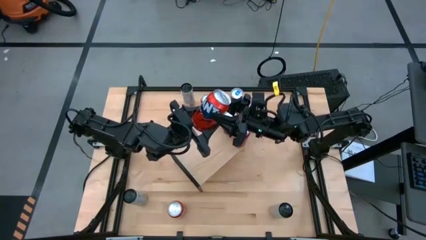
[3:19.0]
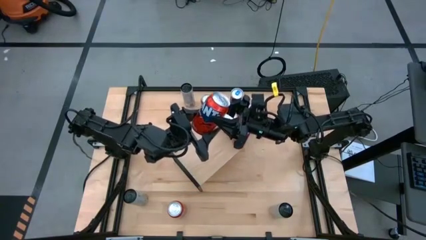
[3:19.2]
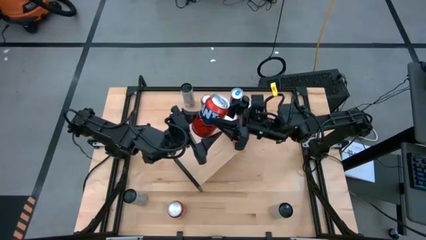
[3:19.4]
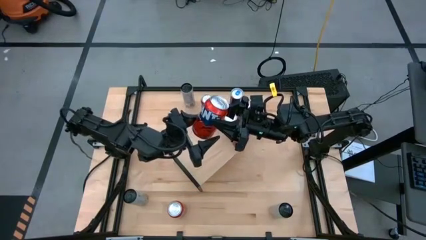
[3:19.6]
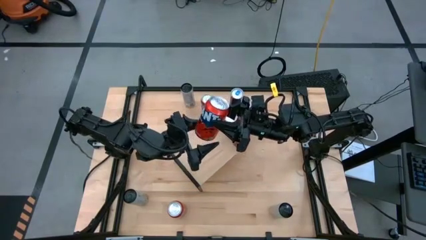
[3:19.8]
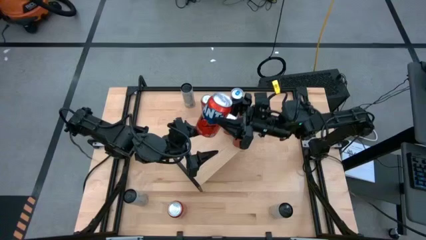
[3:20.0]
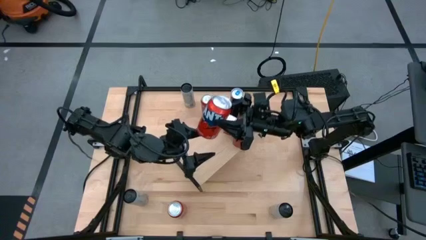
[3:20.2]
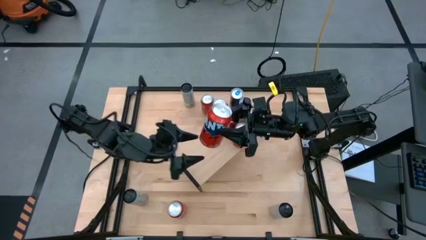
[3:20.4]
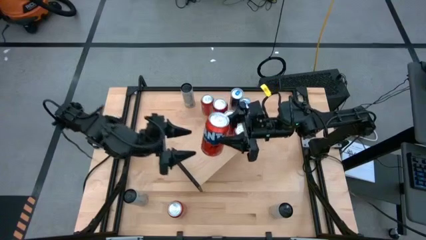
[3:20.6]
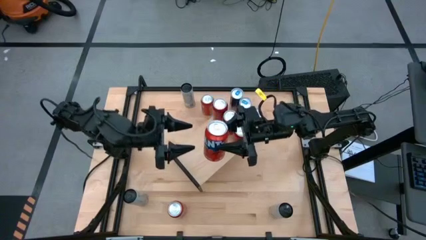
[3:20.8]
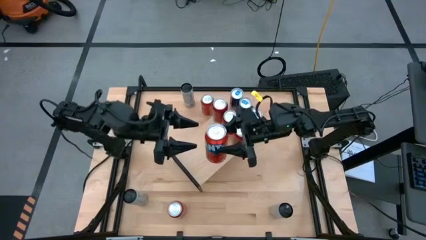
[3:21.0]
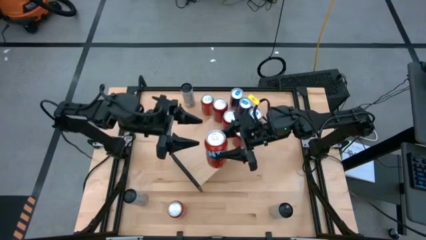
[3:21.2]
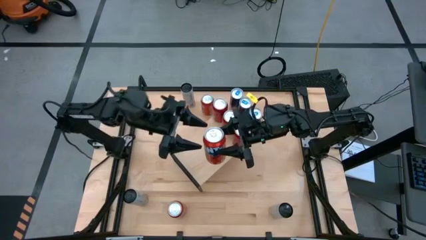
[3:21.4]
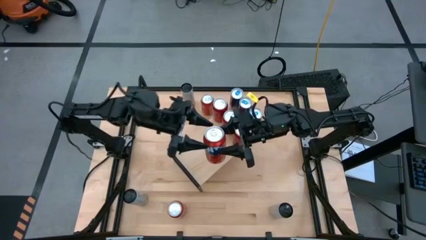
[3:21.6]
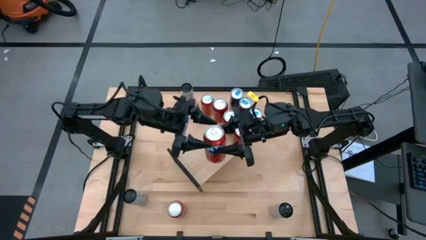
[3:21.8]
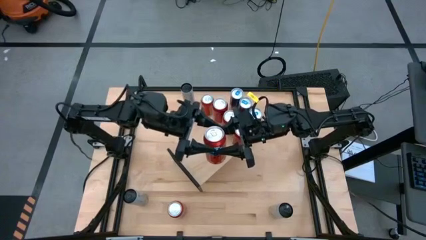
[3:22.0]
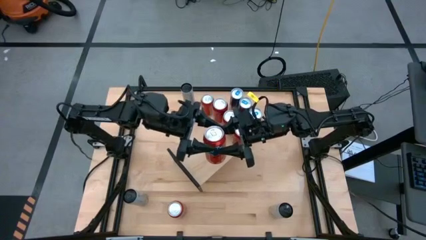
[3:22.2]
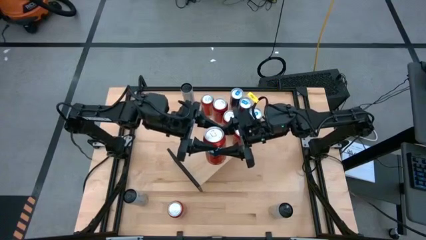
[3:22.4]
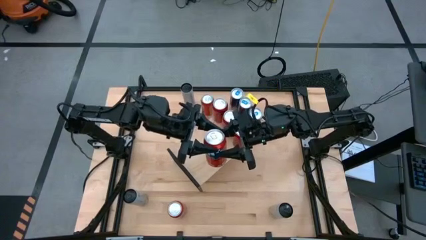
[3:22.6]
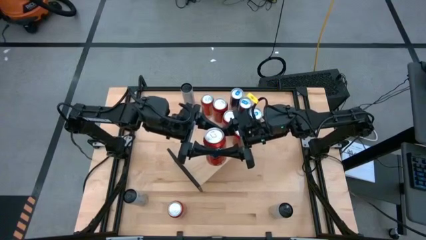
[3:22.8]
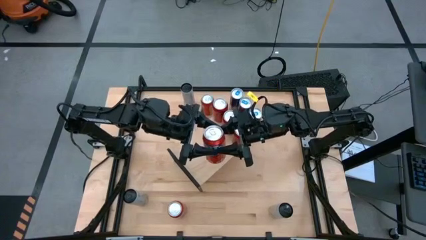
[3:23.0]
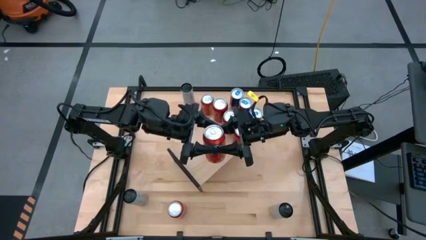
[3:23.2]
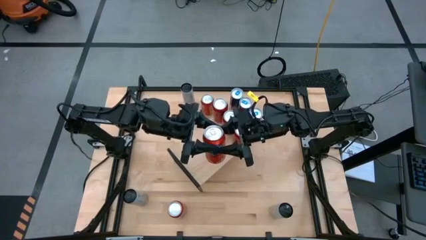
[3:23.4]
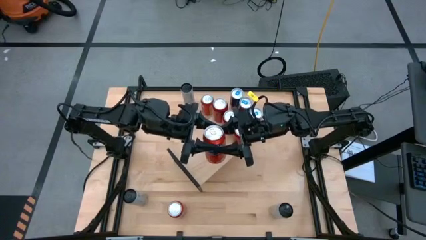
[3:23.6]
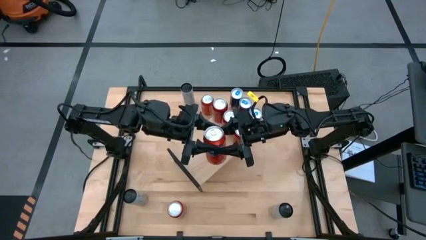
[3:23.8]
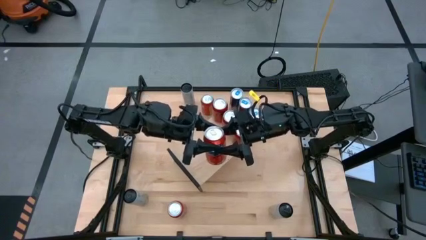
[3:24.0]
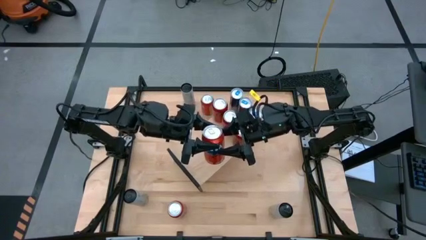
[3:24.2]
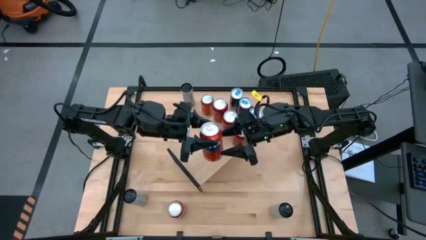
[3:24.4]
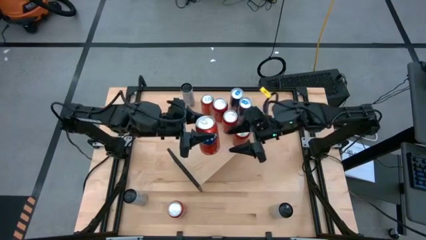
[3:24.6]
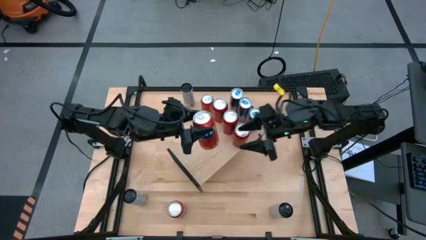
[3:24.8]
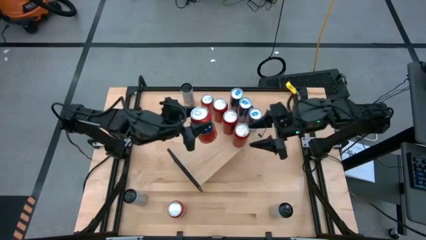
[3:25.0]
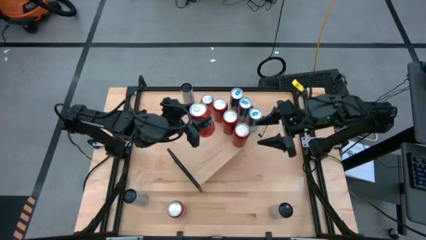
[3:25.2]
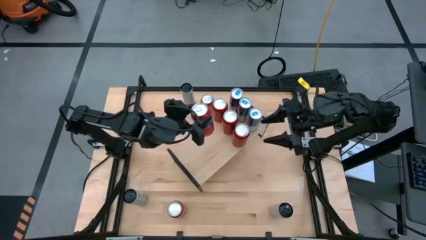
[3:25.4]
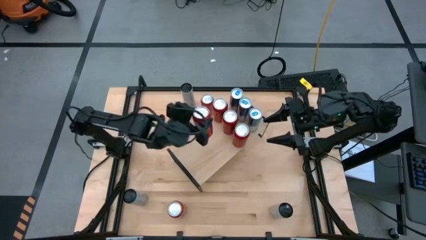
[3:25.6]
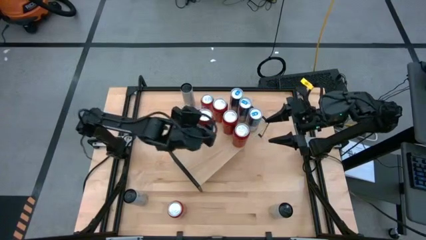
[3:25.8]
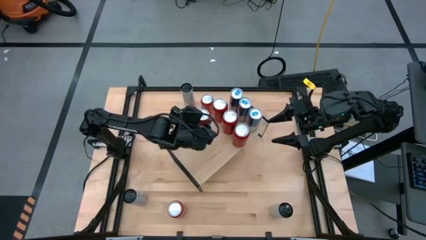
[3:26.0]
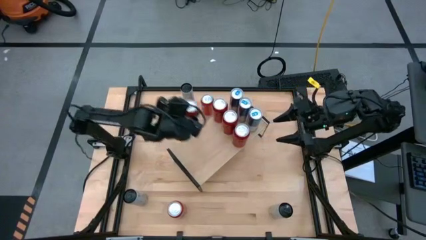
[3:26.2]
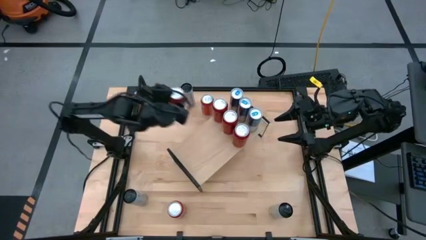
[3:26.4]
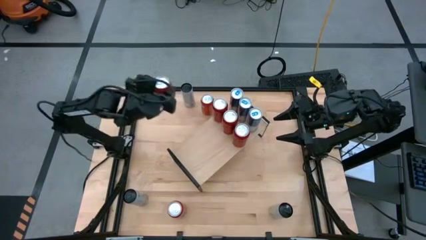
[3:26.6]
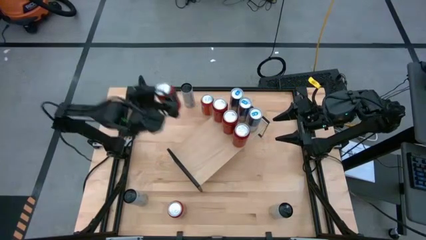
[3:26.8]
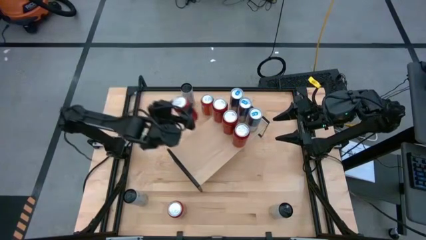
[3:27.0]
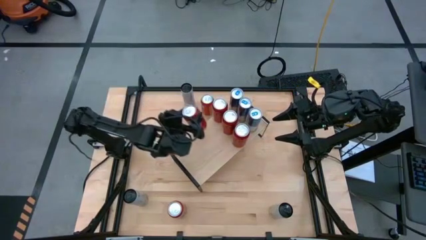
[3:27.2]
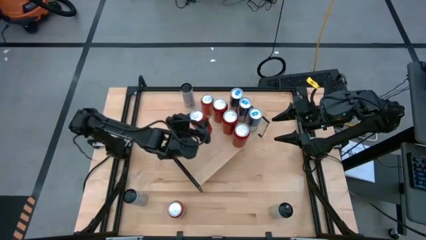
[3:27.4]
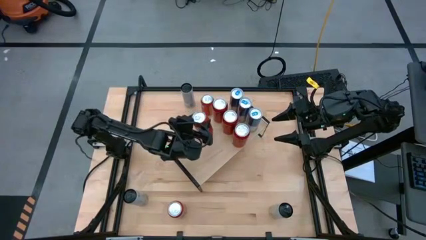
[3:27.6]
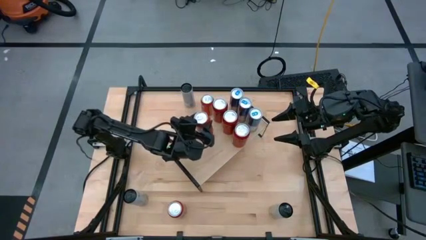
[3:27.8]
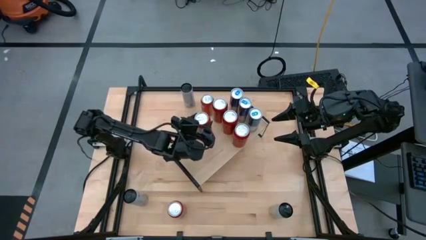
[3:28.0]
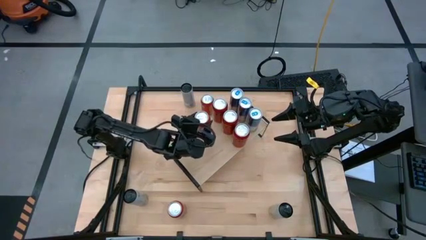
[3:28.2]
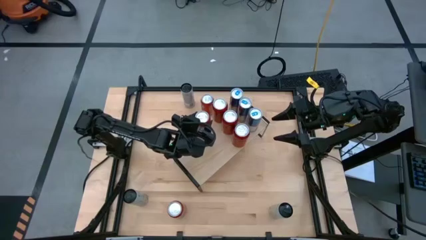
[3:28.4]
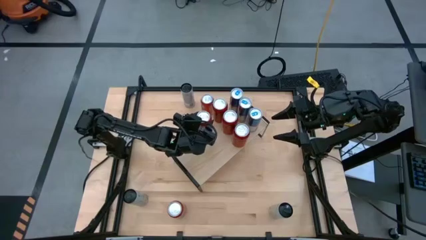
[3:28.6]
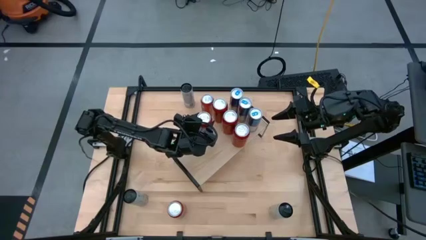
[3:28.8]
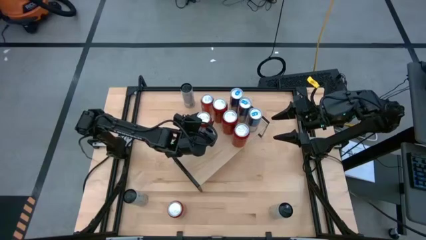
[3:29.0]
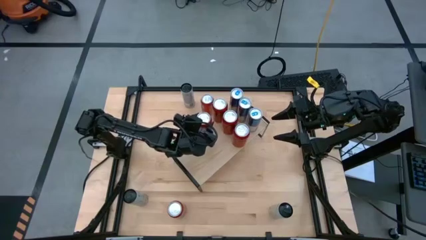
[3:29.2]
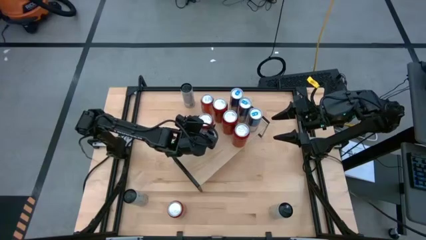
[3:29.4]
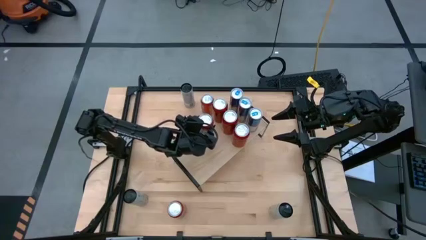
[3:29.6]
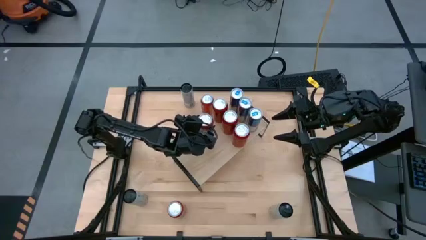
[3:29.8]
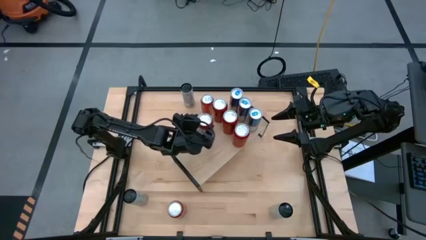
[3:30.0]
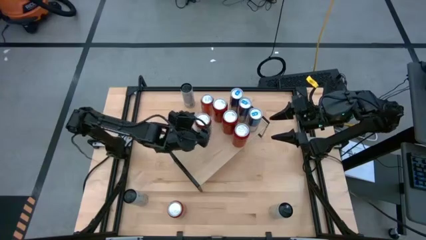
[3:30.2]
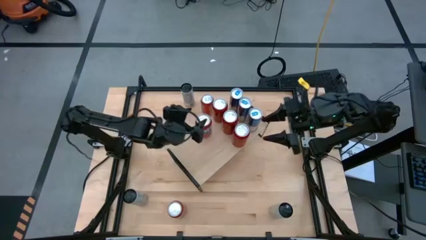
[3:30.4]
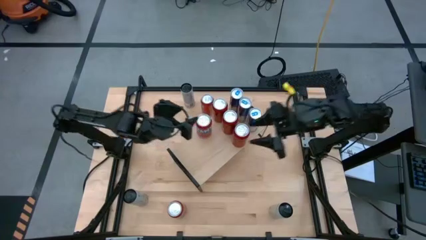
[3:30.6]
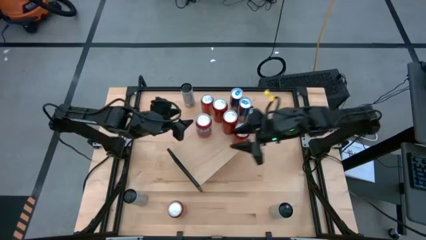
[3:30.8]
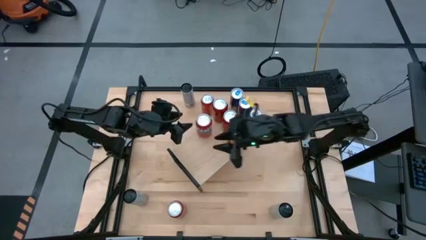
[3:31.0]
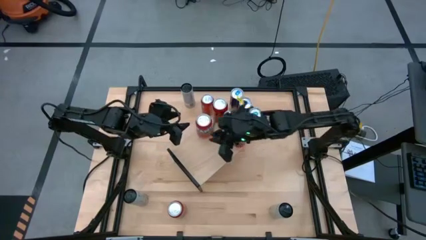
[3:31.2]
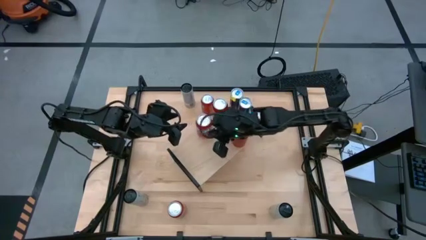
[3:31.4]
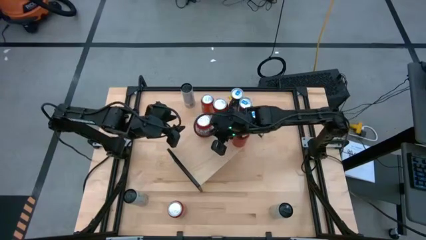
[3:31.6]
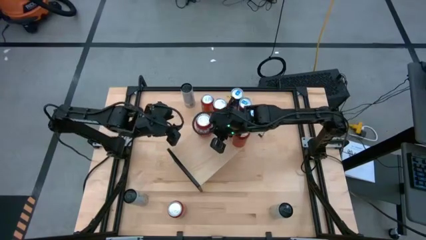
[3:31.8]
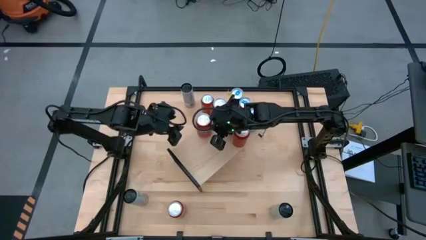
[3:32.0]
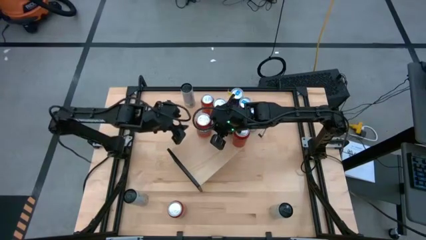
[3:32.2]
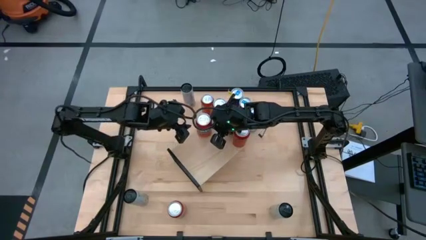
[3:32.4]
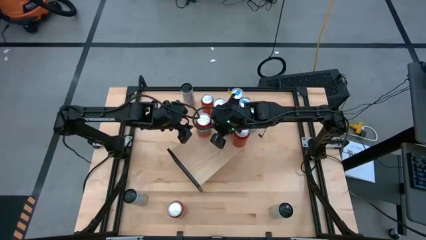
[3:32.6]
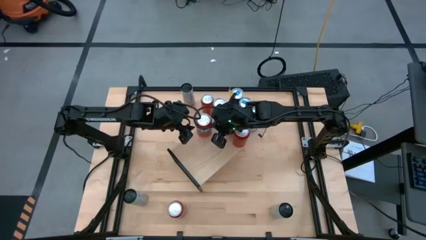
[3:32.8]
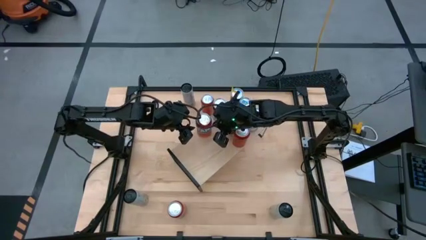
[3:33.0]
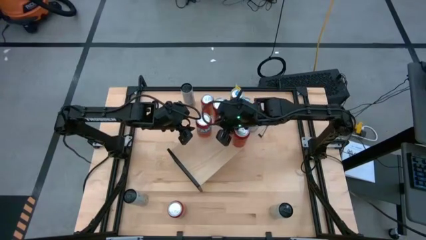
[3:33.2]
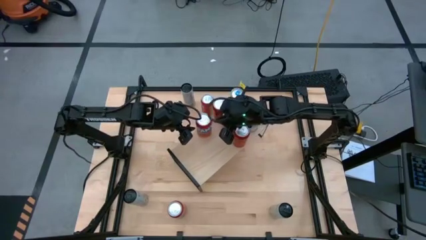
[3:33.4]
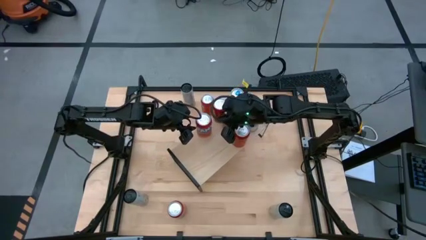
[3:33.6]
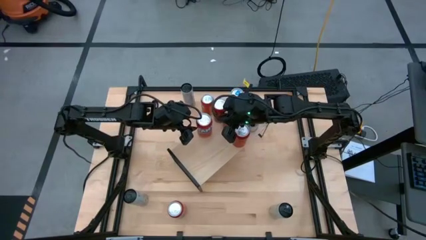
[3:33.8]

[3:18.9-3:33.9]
Task: Place canned beverage on shelf
Put the middle orange soda can on the shelf
